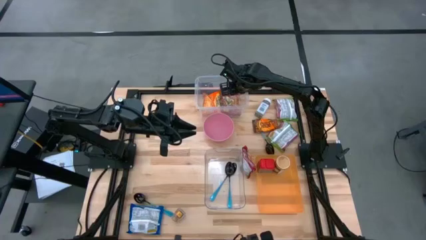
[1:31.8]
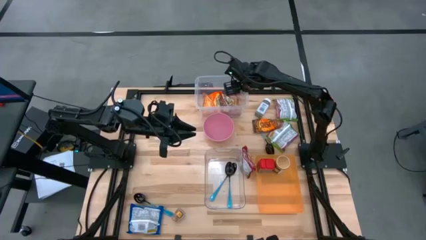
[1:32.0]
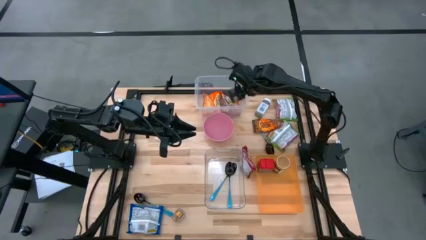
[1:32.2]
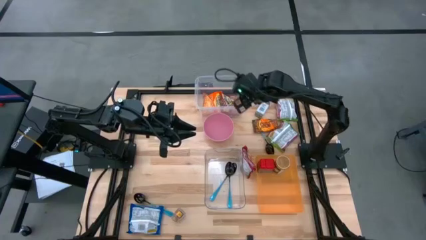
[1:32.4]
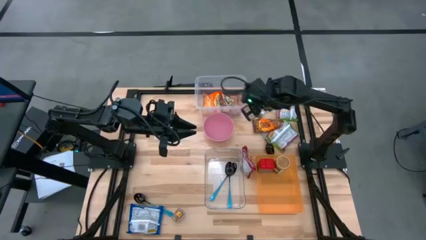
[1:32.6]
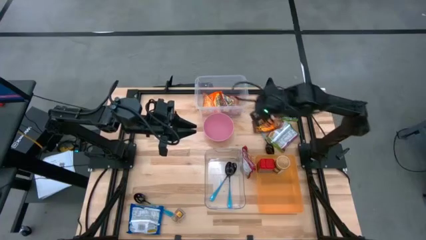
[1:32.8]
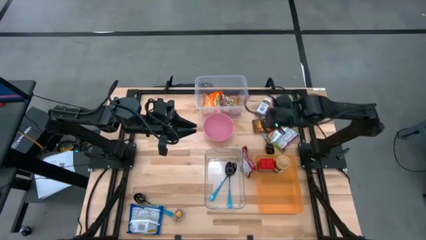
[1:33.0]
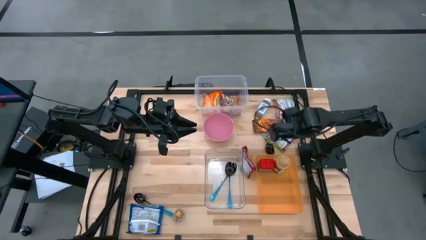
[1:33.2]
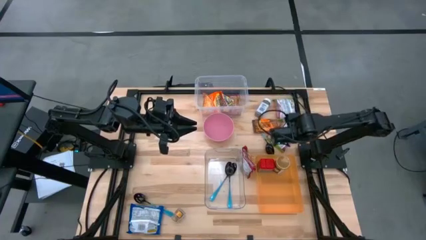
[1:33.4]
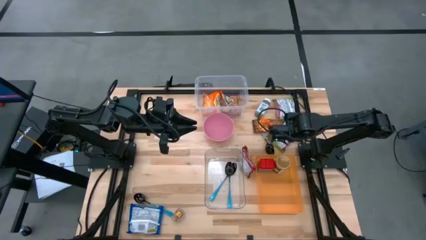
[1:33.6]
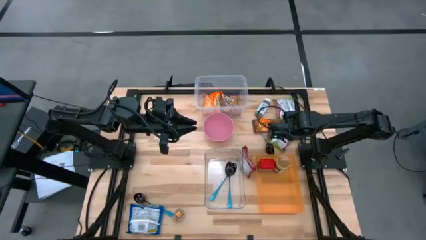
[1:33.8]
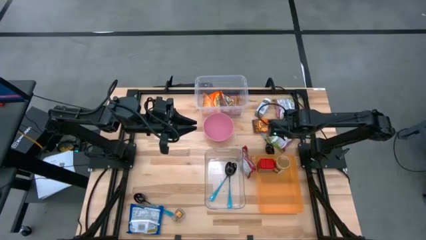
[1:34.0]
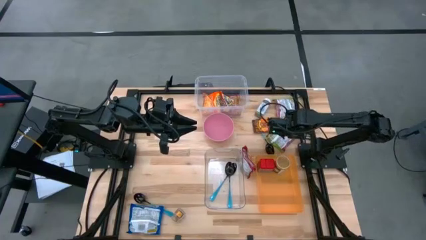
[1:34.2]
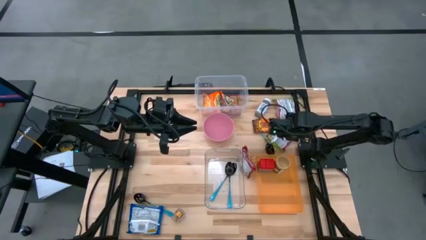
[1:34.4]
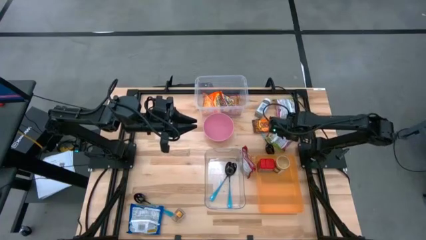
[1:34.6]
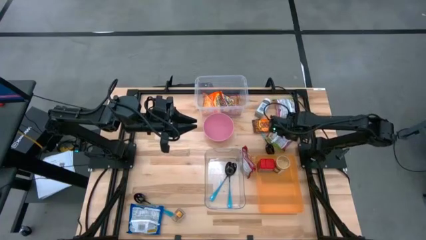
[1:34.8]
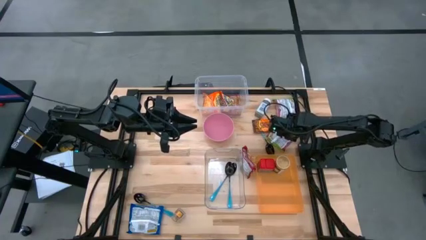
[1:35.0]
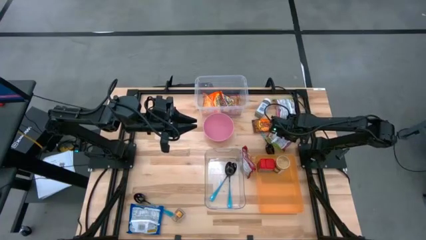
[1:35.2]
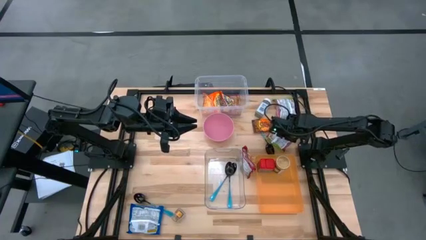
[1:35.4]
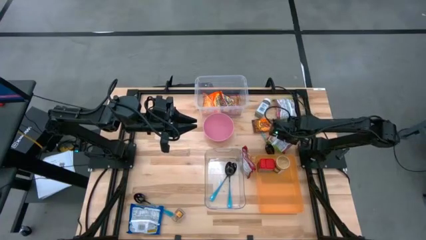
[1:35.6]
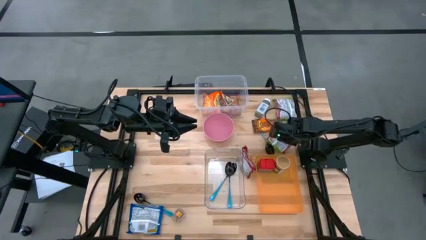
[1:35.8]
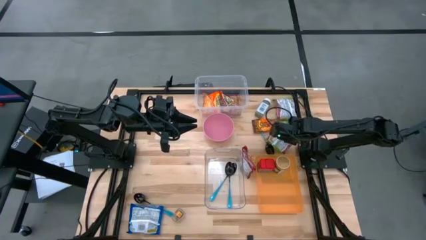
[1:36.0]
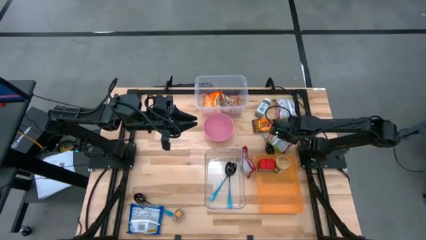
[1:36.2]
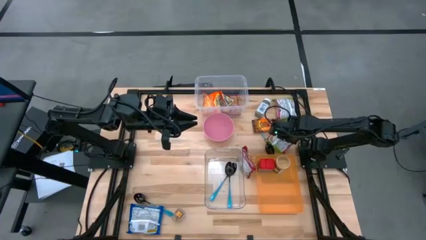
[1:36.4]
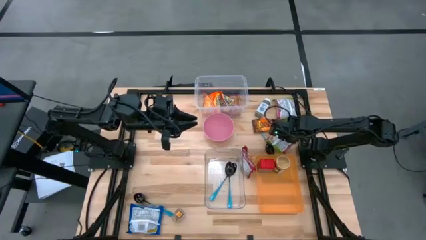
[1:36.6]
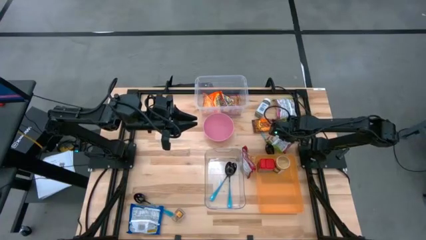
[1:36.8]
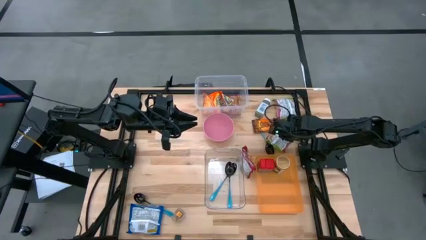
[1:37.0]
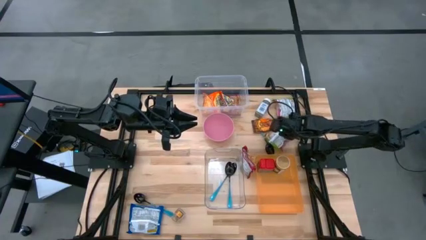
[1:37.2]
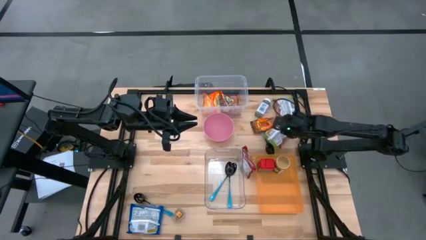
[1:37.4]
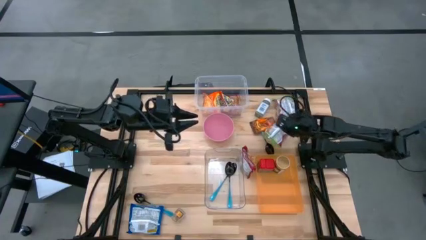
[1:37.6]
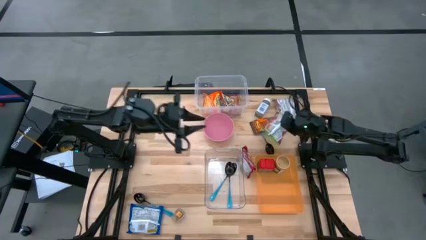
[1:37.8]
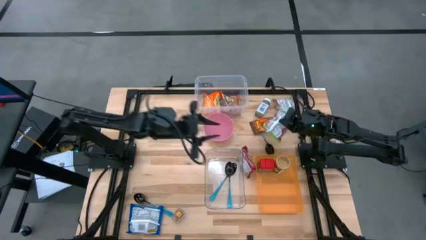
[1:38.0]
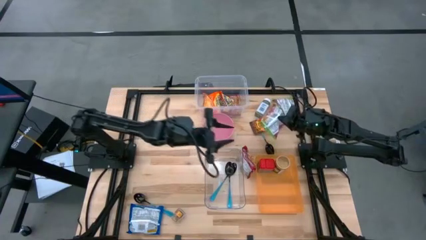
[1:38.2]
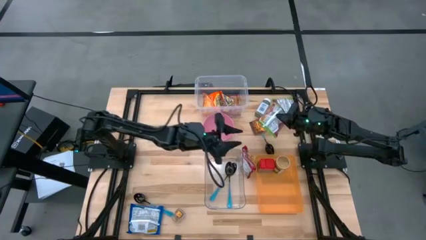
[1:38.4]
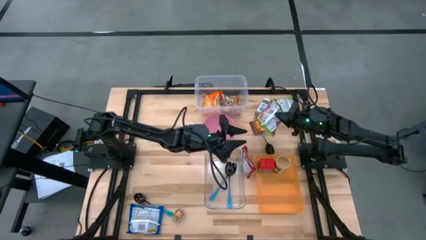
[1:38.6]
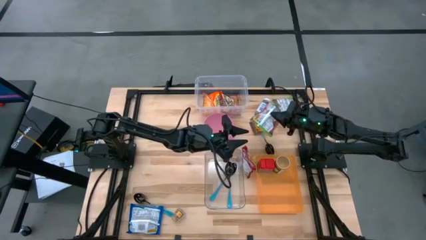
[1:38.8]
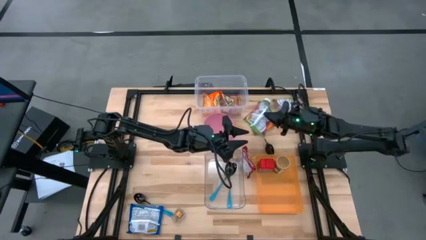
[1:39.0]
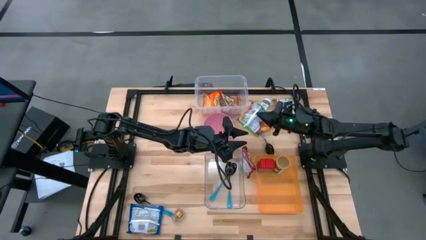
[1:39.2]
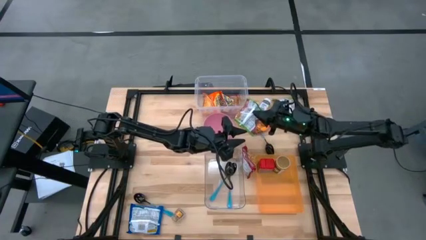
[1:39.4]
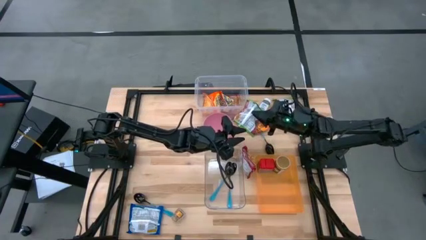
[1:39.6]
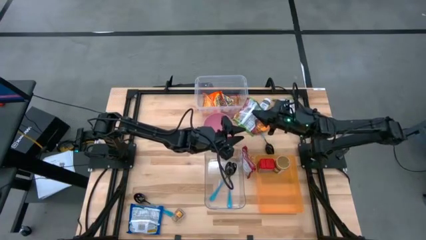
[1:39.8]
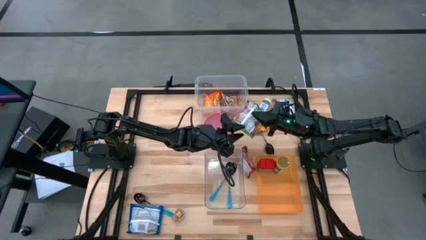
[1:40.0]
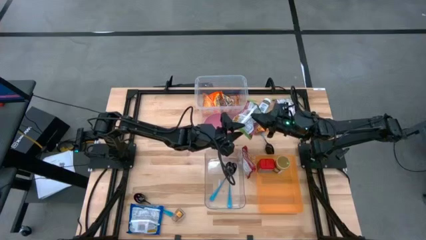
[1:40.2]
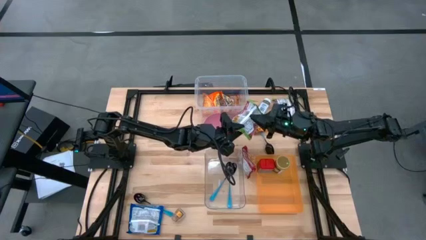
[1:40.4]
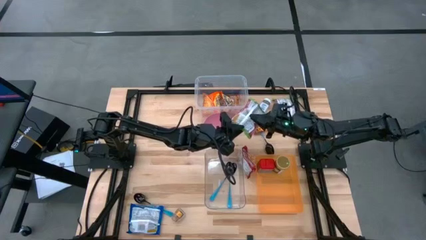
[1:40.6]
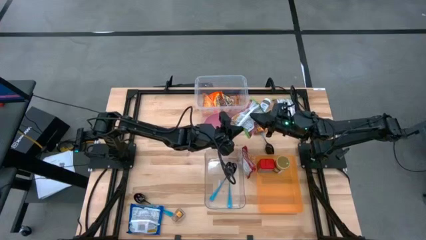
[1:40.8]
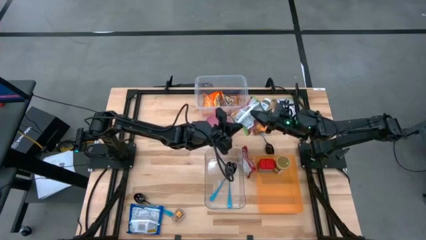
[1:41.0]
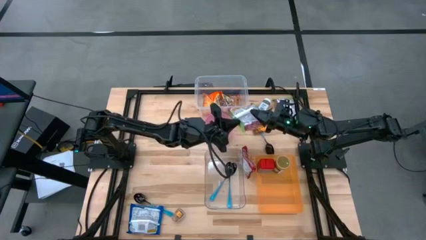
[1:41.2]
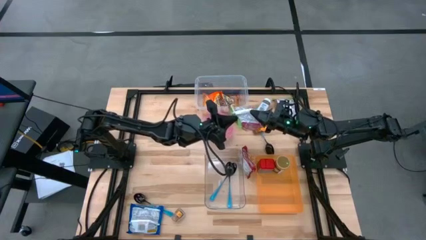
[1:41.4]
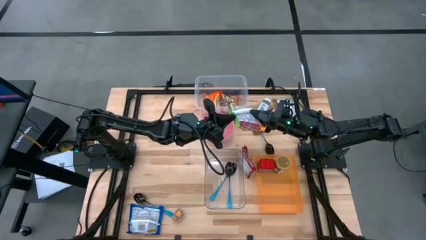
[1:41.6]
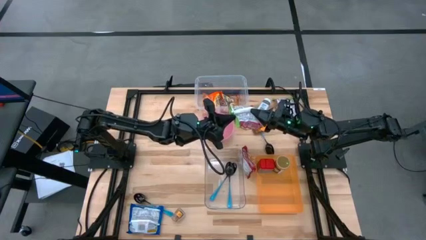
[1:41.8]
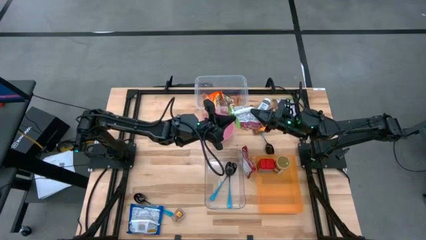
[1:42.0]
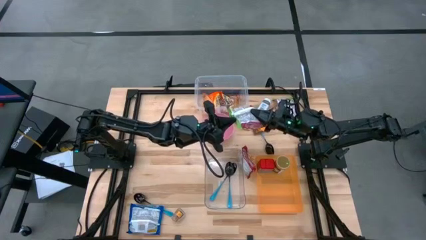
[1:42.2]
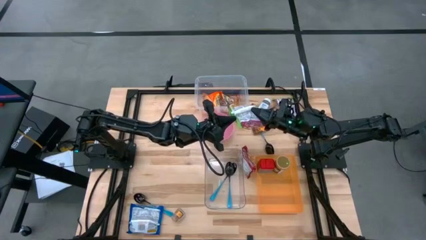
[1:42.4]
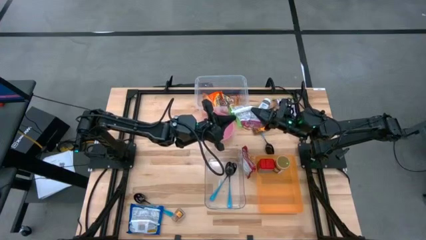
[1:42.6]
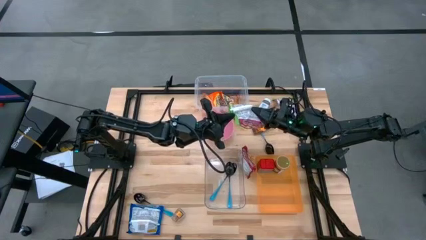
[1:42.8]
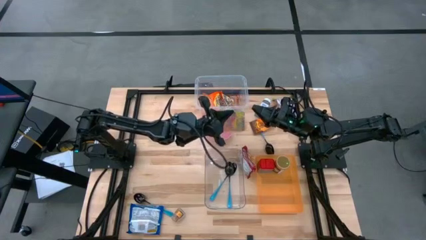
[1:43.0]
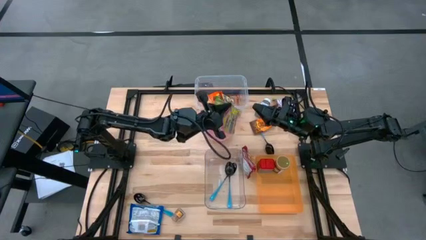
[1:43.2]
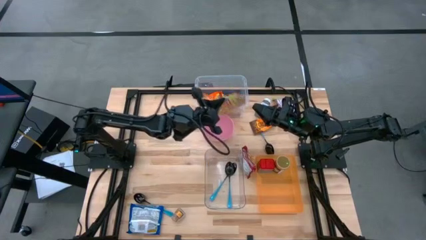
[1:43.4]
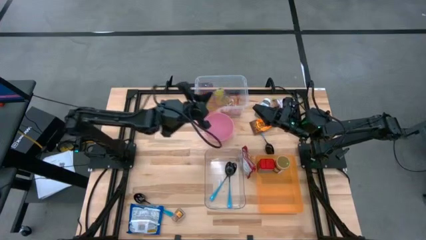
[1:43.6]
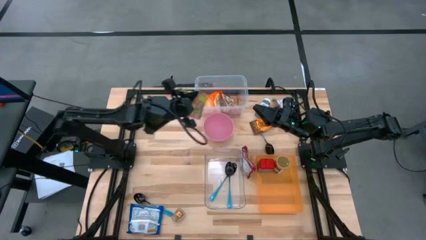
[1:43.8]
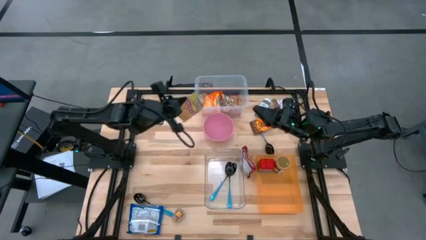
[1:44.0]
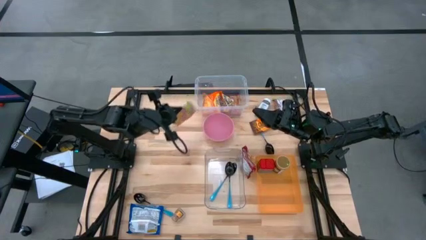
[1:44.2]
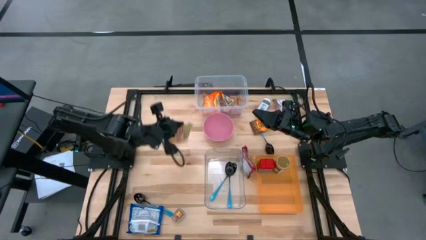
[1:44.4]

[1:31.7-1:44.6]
Task: Pick & Place Food Item
Put the green noodle pack into the top transparent bin

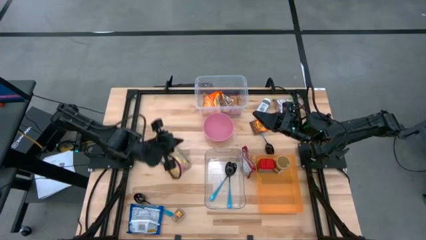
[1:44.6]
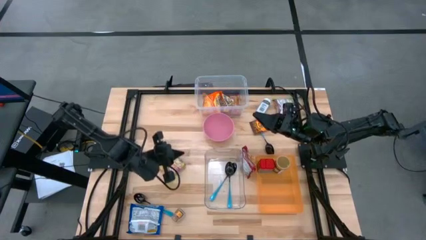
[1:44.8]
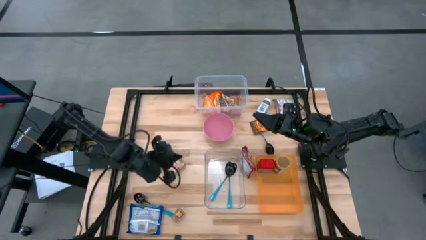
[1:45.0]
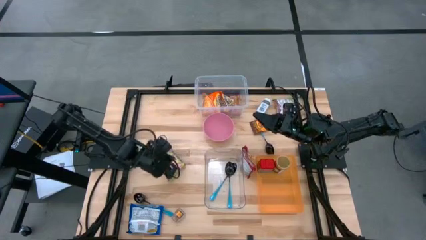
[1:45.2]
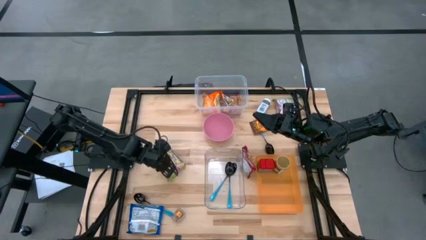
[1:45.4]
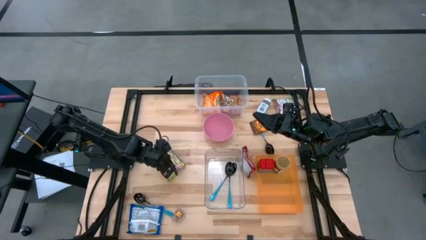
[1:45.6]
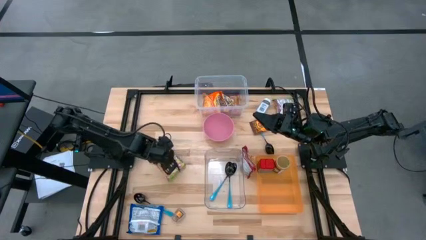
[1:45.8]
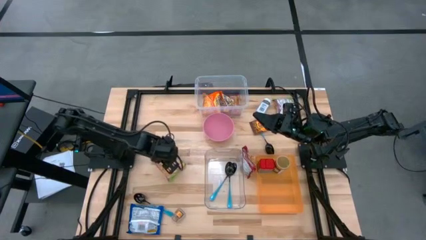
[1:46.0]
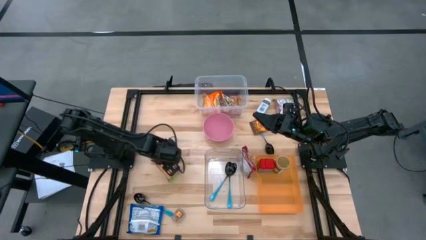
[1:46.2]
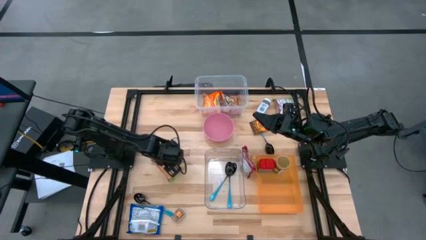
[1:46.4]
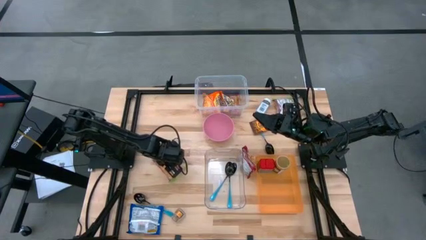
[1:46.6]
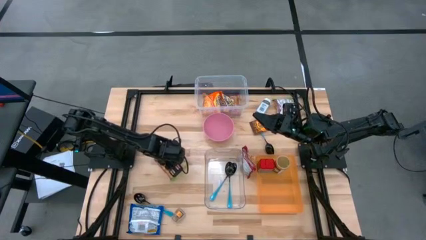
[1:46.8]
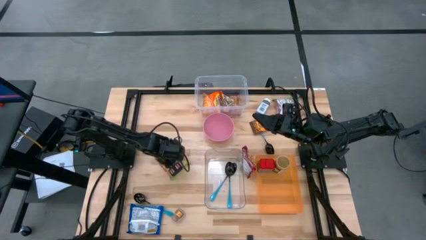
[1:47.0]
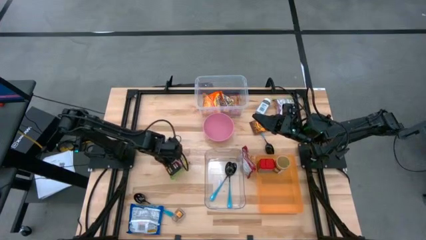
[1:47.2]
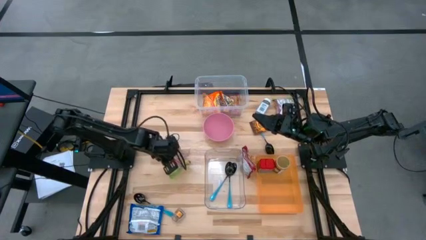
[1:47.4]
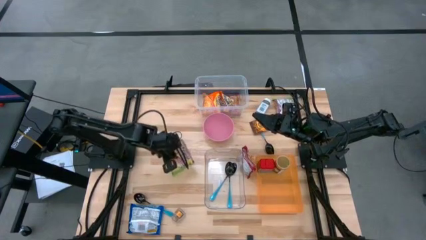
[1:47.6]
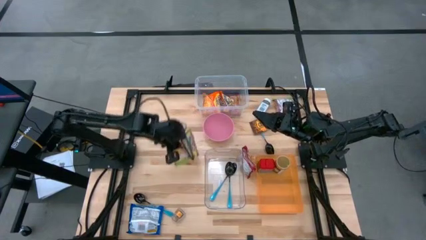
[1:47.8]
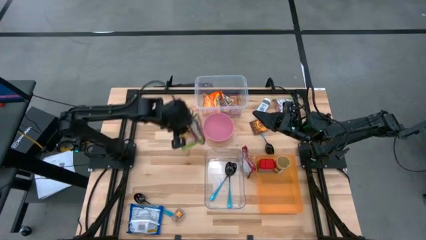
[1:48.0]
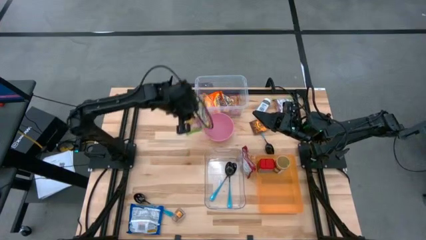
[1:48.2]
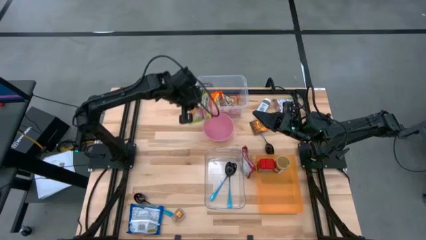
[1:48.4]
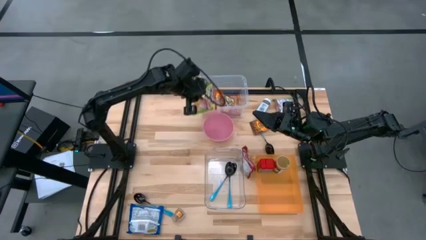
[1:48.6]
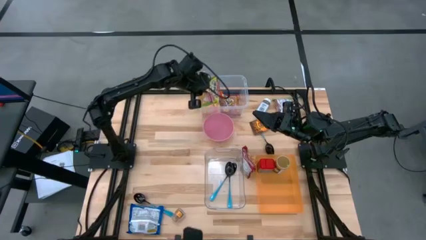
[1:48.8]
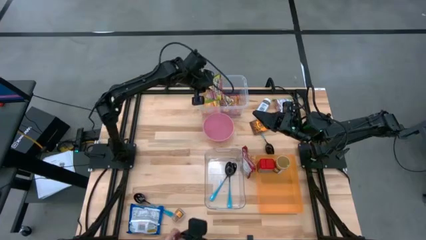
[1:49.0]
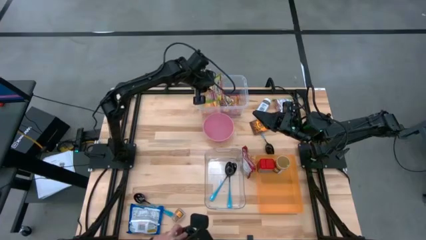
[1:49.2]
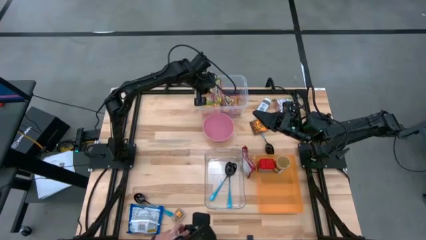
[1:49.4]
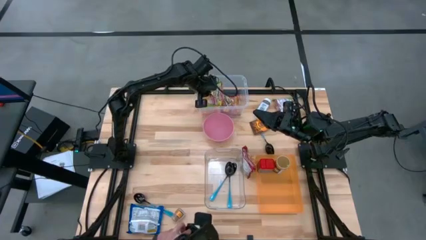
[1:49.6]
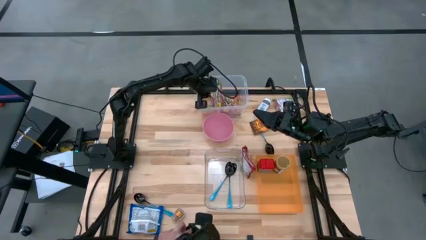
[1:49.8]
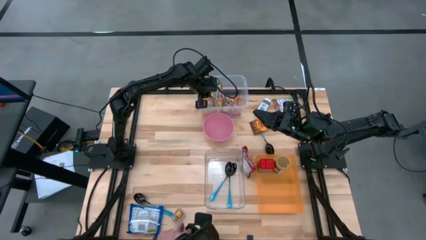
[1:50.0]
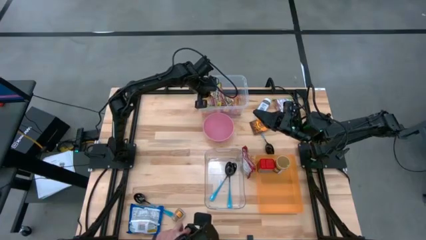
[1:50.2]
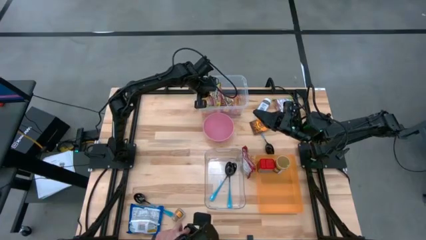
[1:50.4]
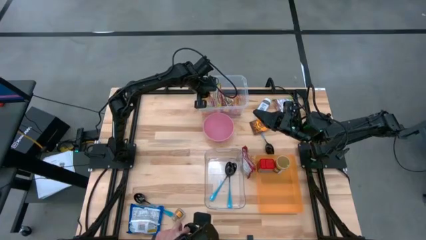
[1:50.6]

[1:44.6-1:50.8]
Put the green noodle pack into the top transparent bin
